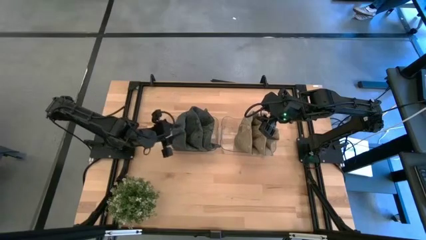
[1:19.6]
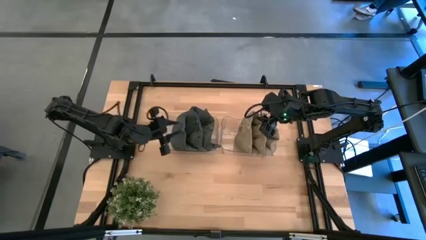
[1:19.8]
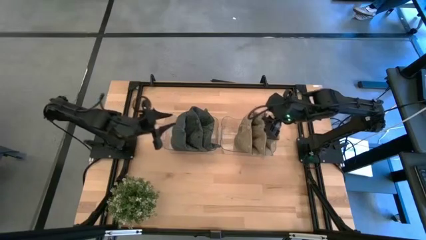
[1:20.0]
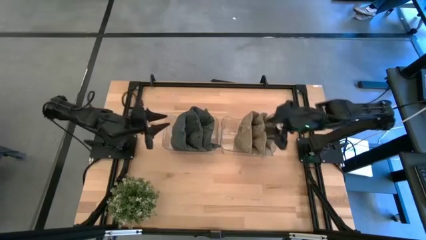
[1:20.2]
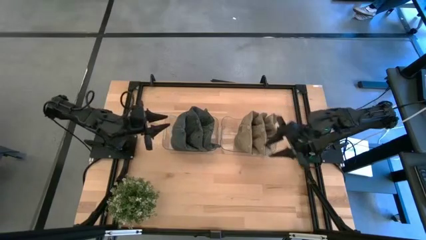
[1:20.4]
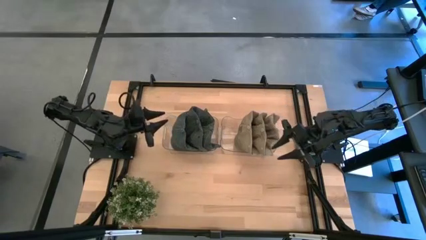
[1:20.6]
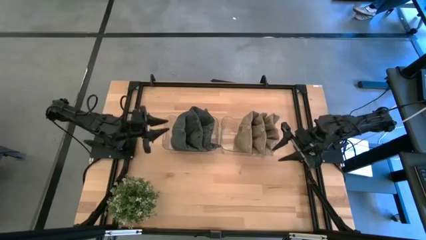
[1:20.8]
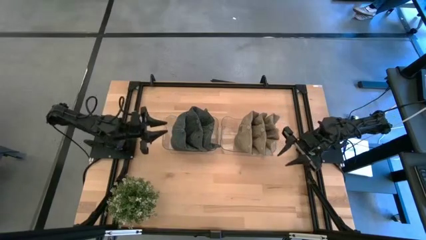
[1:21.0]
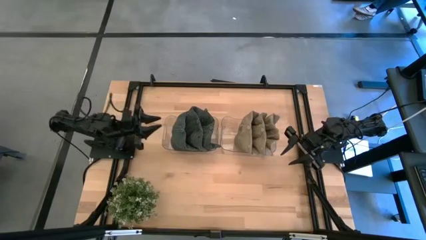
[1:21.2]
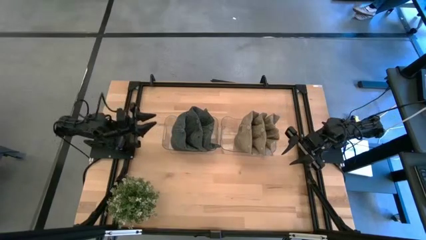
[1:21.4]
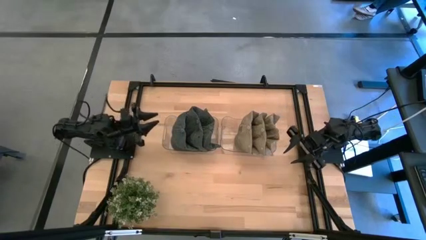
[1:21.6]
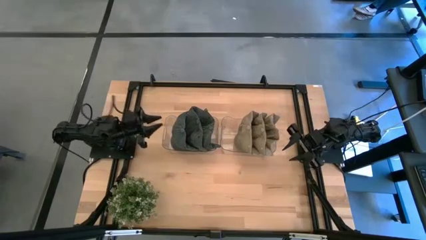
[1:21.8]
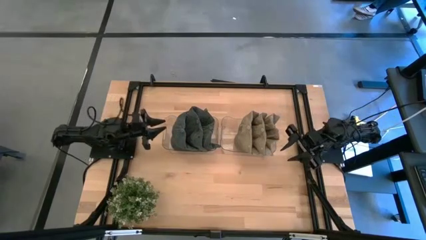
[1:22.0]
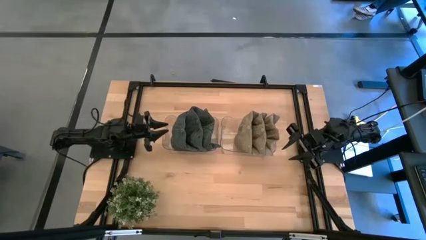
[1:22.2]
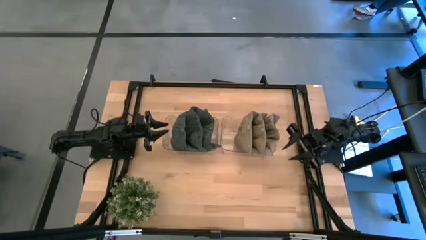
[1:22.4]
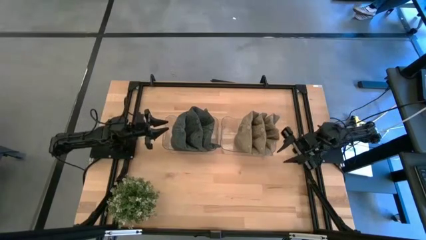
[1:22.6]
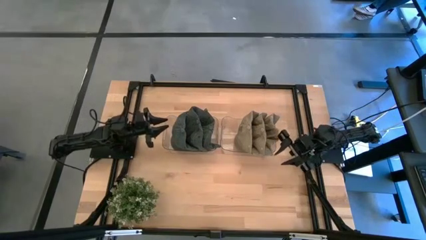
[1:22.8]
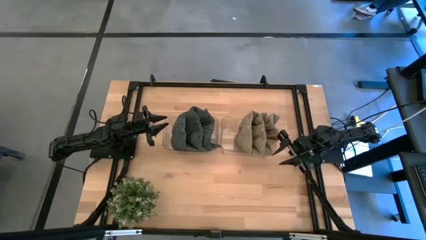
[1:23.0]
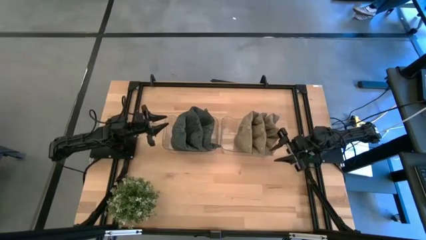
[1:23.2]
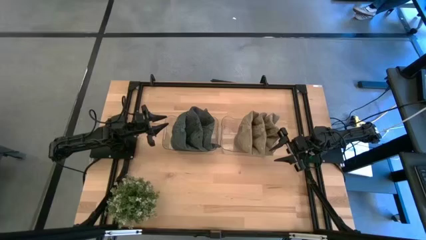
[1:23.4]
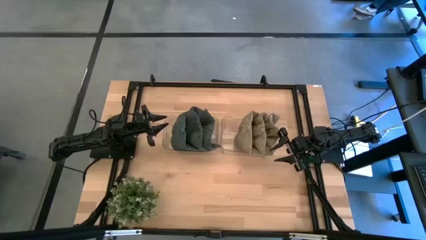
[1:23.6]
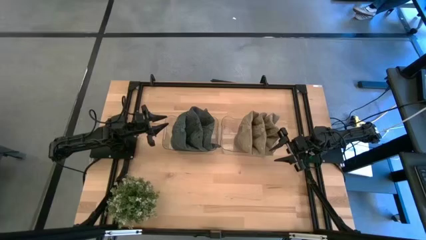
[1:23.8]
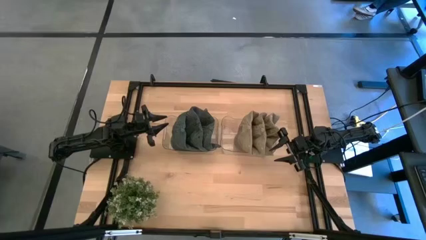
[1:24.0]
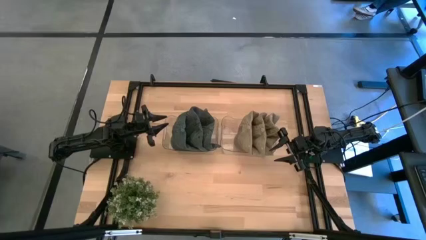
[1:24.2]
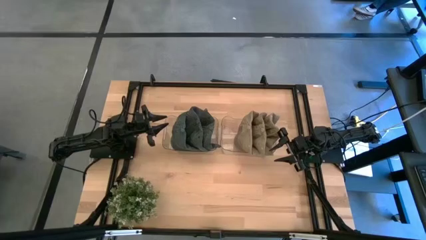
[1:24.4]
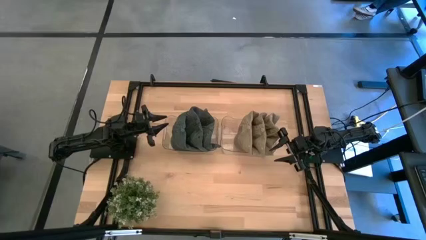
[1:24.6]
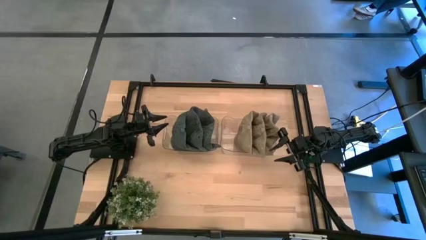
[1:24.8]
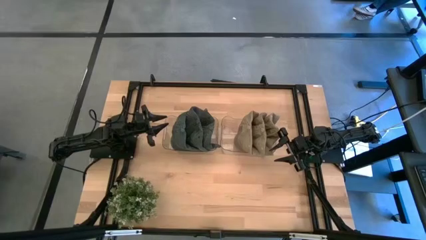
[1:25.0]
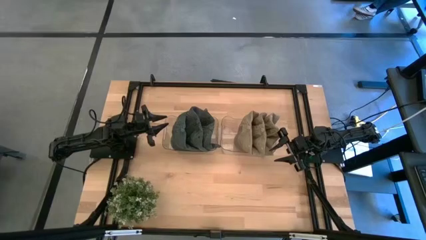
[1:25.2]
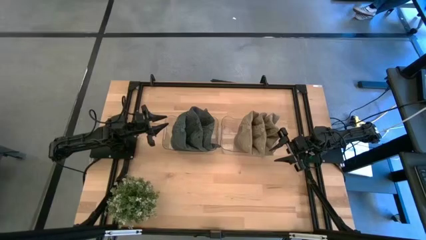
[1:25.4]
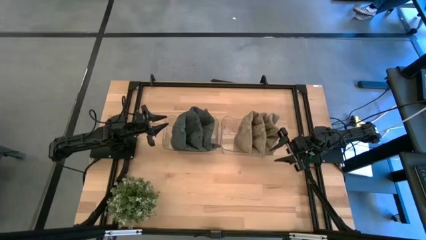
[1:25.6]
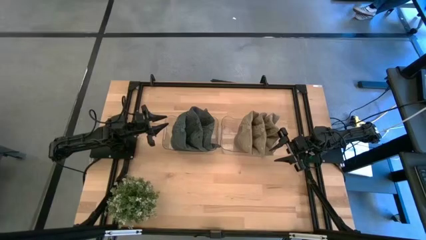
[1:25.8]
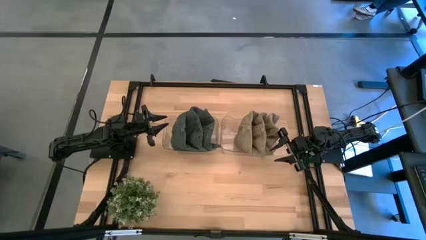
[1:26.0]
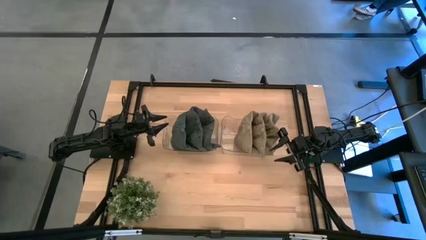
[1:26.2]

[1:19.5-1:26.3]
Task: Pick & Place hat
Return to Home Position

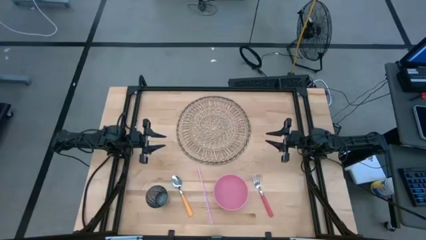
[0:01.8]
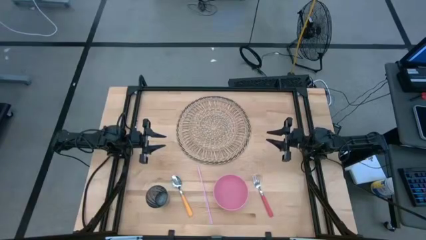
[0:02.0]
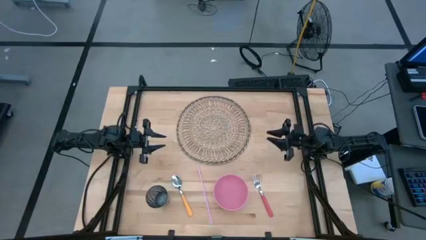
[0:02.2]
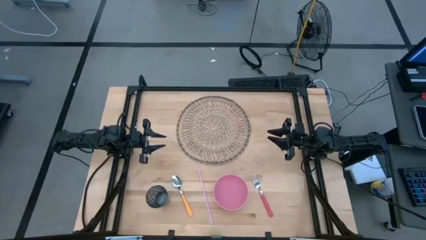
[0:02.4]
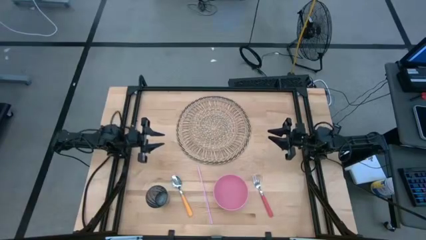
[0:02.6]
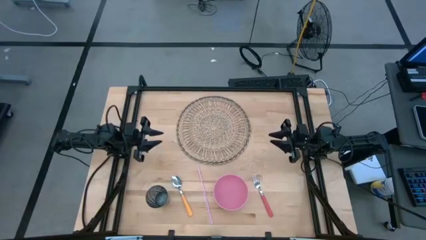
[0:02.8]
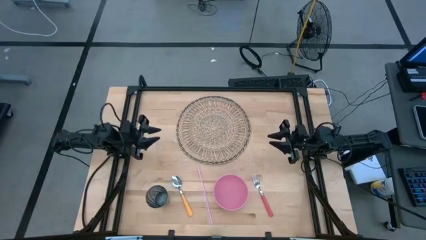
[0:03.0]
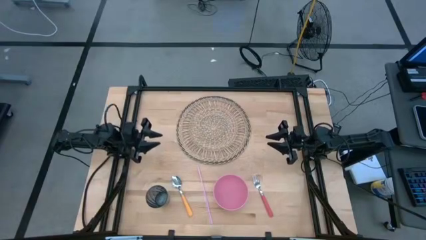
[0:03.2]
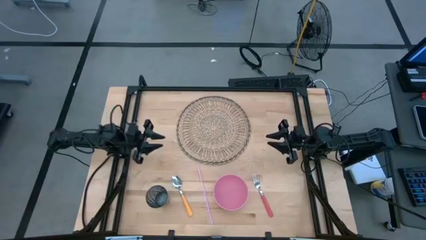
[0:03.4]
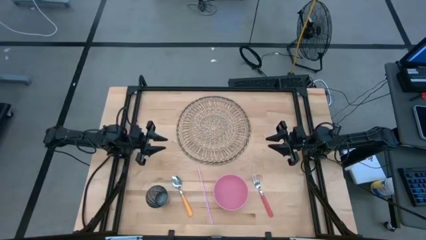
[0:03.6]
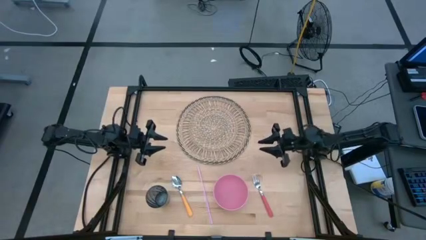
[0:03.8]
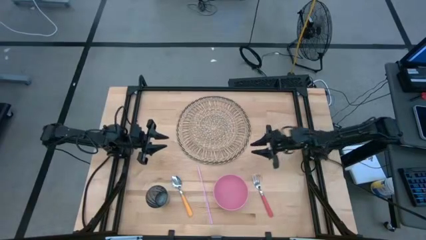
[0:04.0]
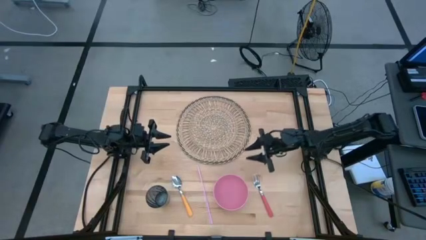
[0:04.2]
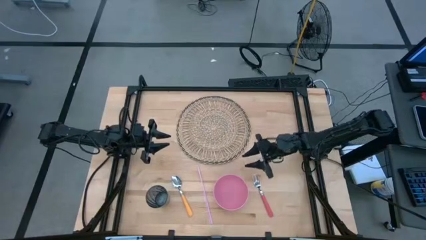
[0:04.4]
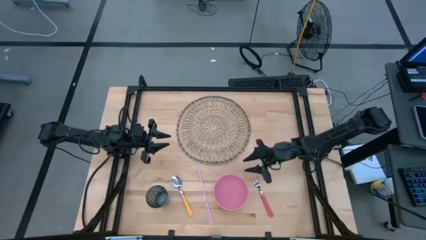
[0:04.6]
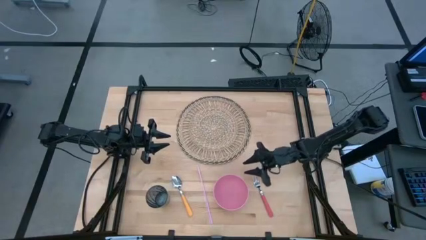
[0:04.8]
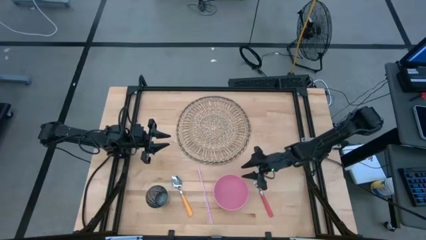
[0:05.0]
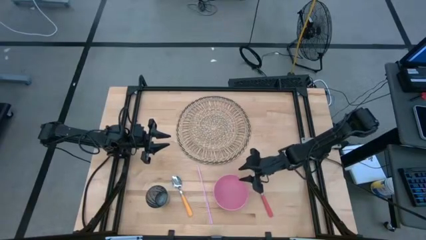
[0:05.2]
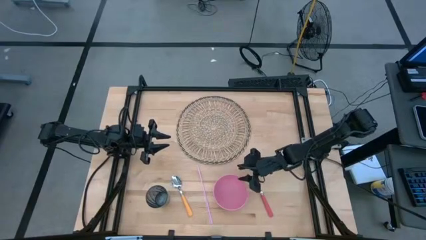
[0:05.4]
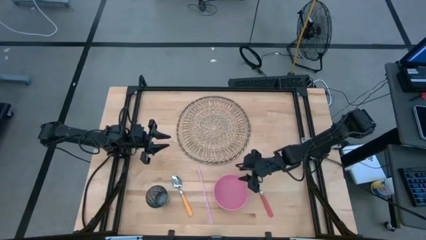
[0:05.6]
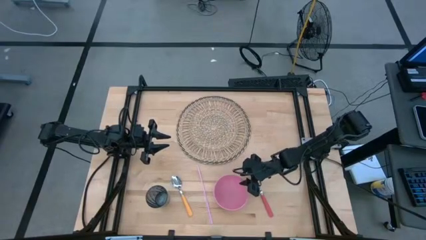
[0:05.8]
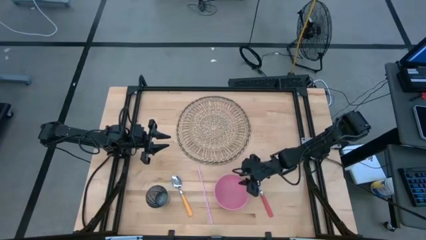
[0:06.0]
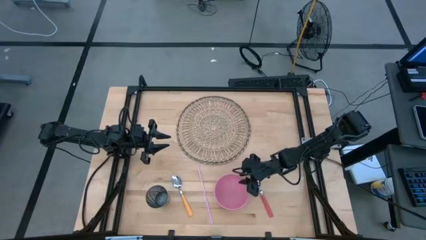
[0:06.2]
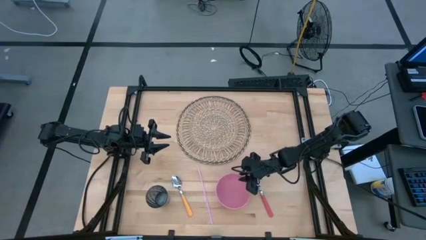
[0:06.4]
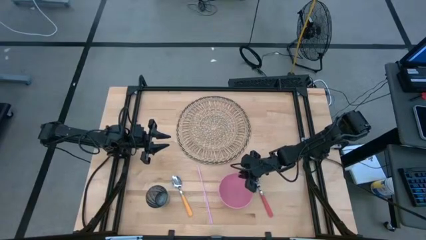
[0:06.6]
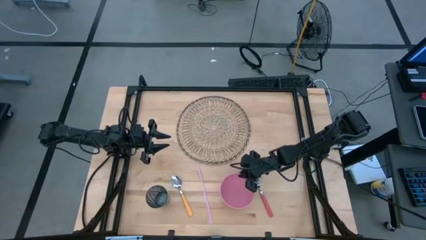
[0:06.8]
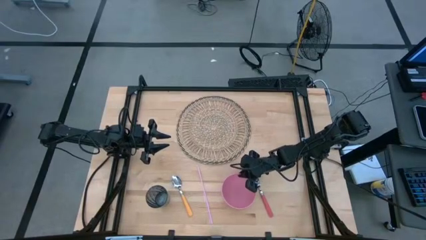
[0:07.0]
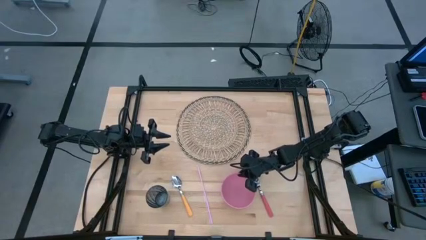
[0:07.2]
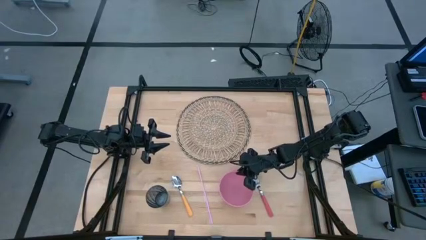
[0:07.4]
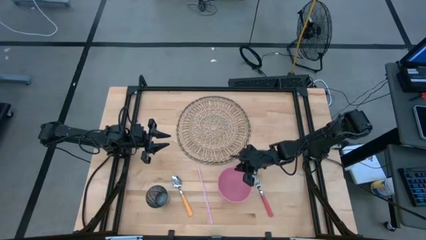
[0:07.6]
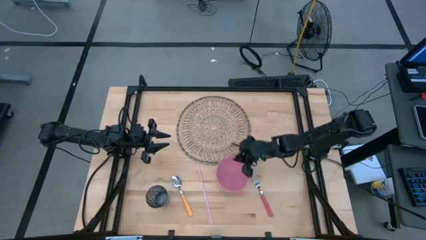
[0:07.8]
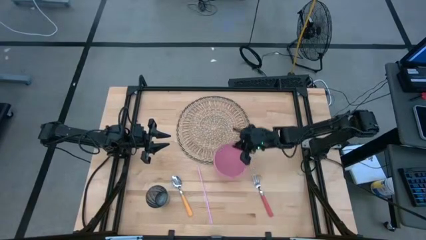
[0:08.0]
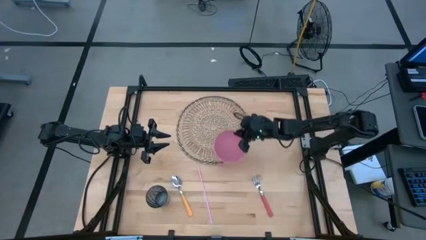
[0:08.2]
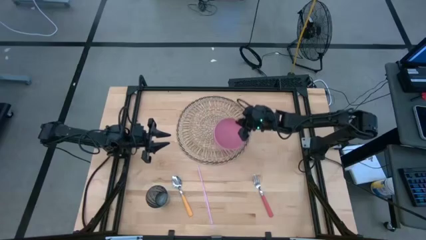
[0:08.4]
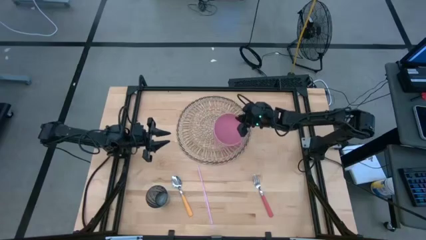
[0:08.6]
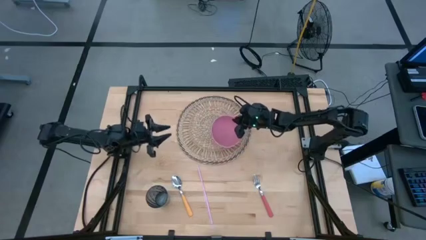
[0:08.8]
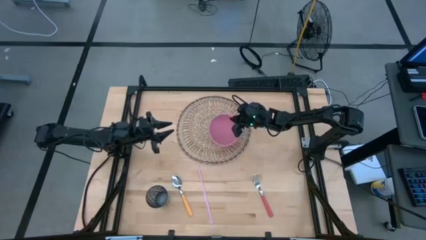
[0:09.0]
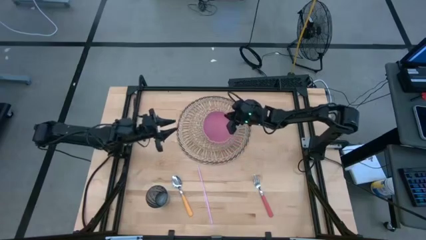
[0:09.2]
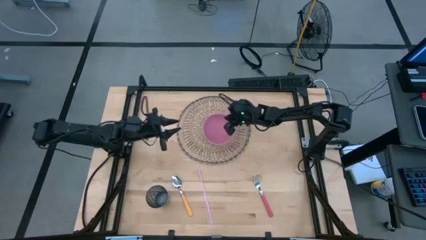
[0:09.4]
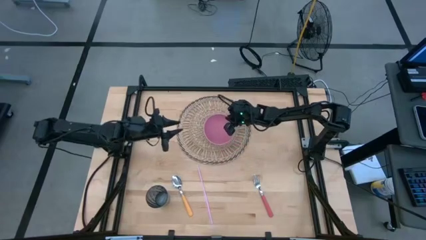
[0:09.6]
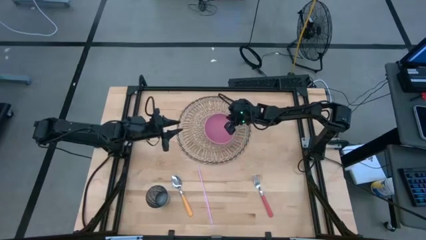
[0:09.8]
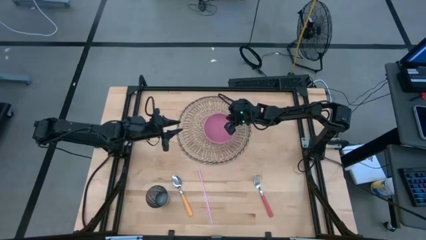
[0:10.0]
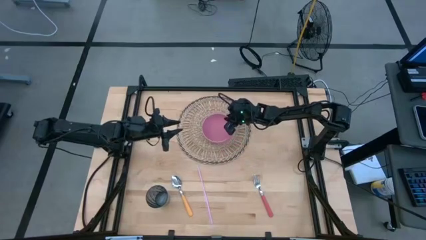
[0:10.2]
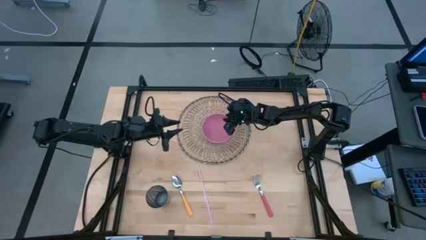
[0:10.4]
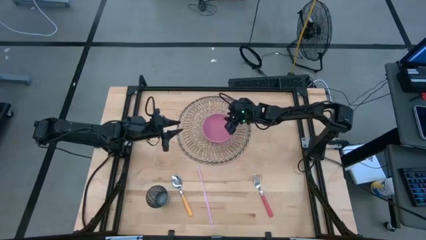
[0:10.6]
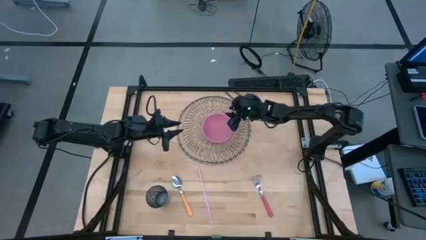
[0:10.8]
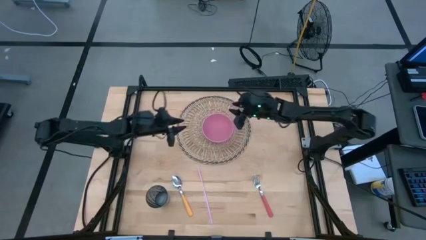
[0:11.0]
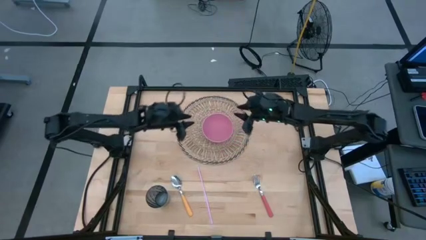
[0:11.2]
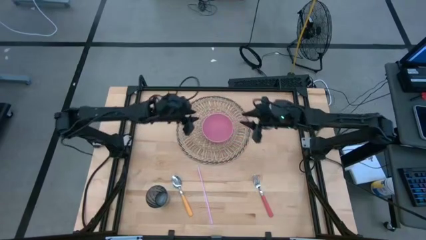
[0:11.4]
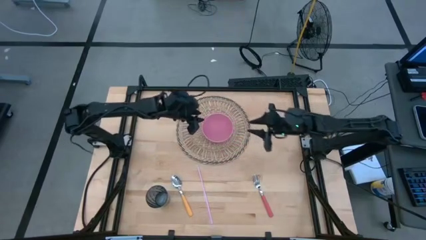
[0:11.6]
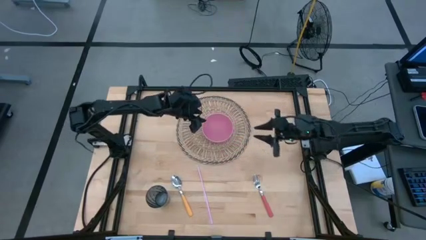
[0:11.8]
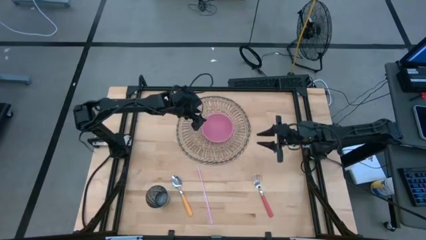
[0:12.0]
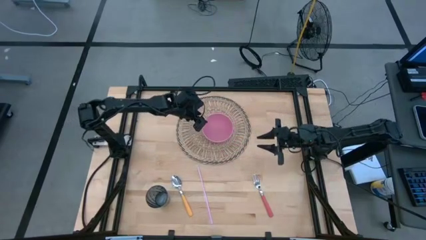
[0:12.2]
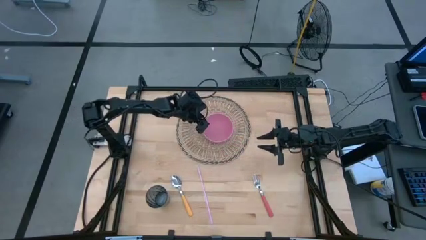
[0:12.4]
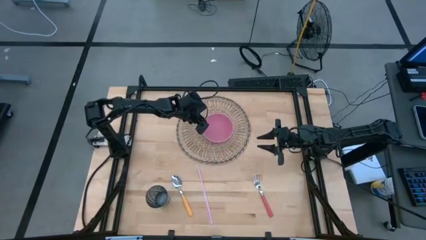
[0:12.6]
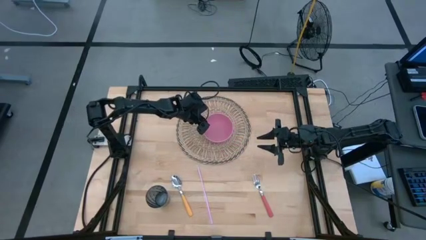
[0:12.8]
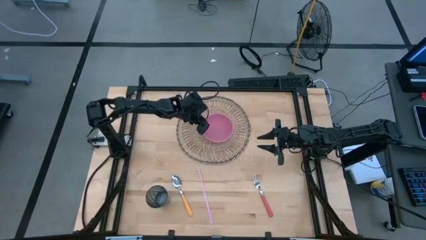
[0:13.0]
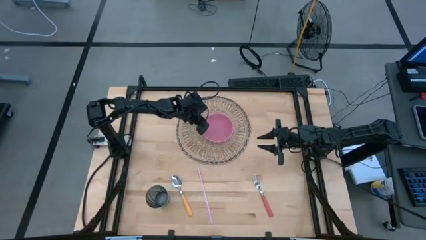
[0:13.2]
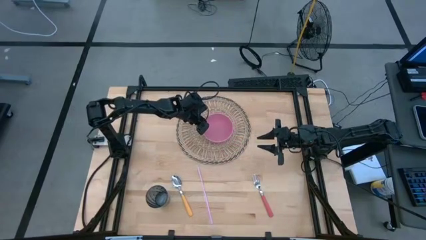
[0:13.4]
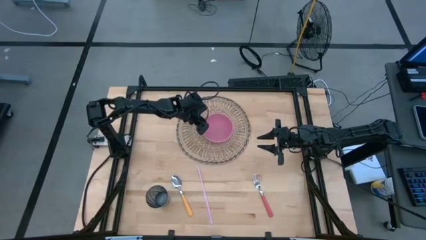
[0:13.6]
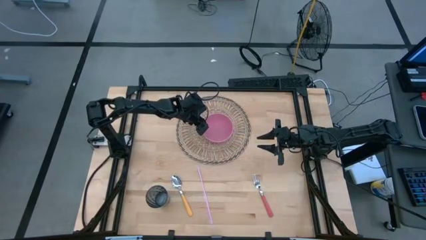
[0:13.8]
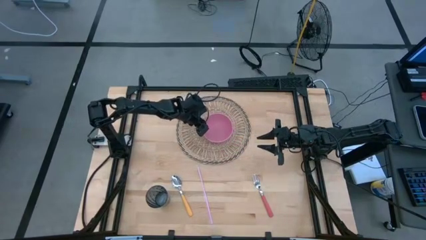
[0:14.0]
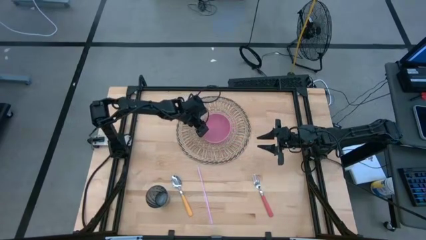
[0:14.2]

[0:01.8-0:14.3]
Task: Pick & Place Utensil
Put the pink bowl on the middle left of the brown placemat
